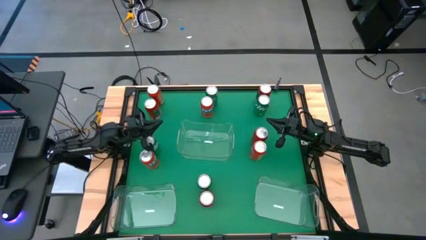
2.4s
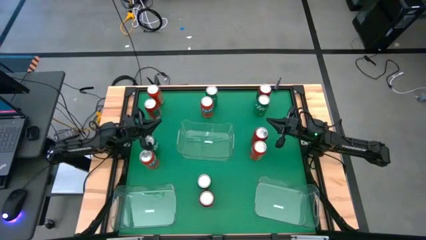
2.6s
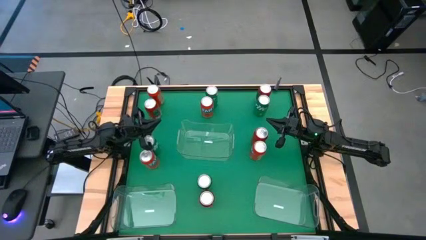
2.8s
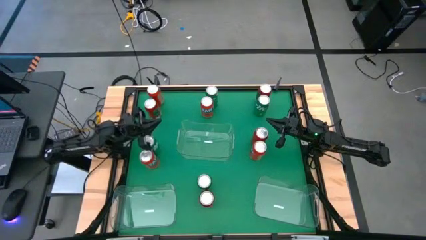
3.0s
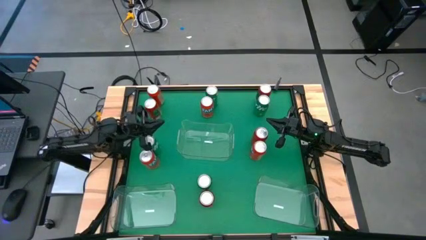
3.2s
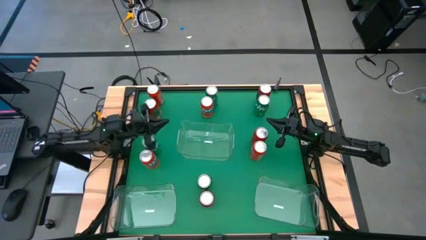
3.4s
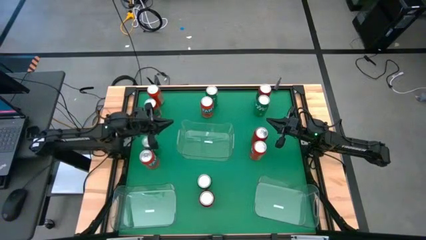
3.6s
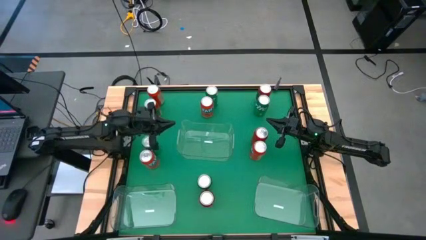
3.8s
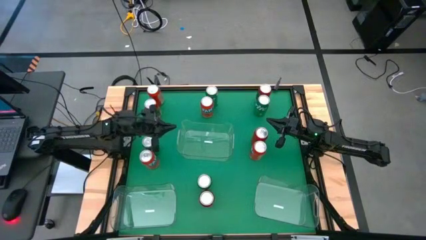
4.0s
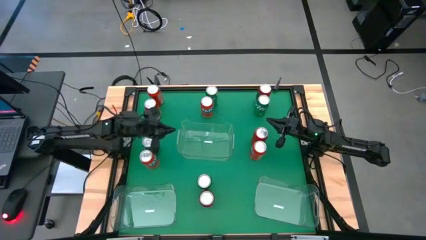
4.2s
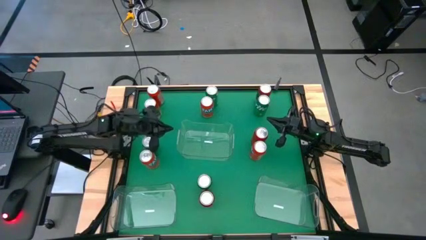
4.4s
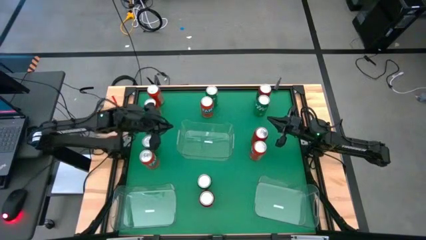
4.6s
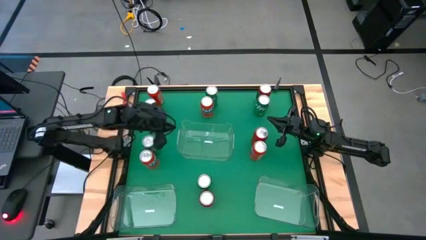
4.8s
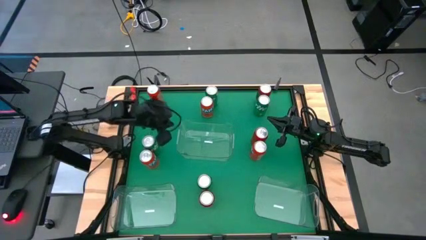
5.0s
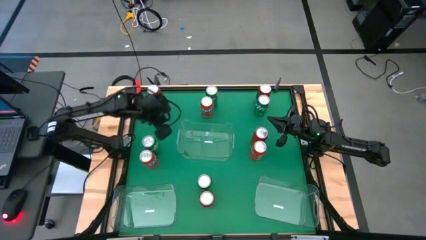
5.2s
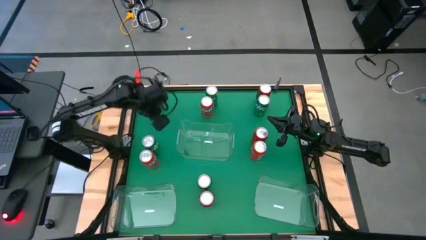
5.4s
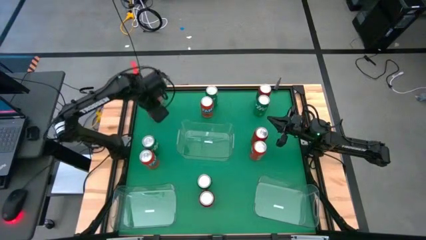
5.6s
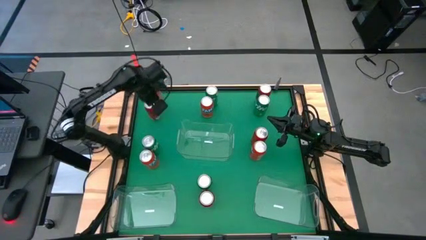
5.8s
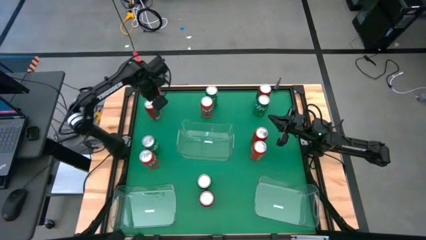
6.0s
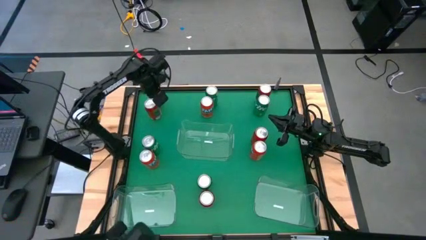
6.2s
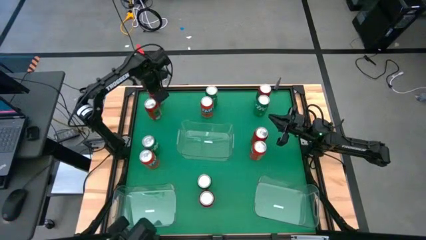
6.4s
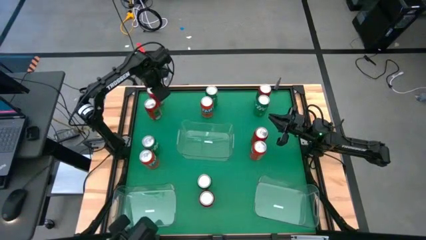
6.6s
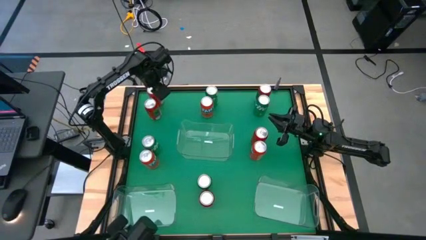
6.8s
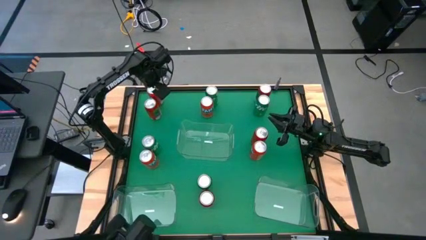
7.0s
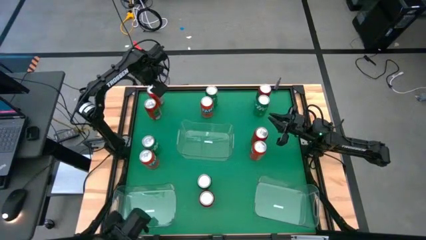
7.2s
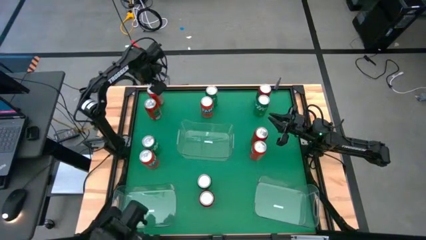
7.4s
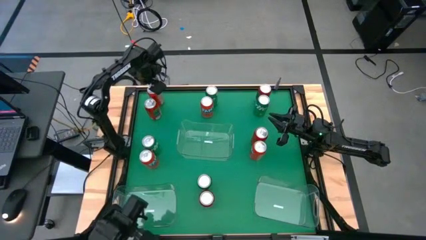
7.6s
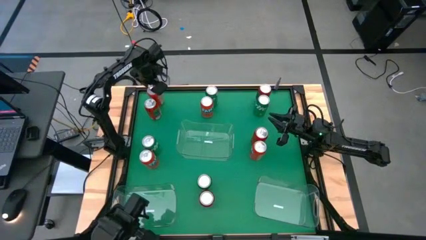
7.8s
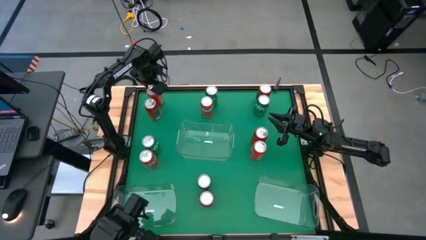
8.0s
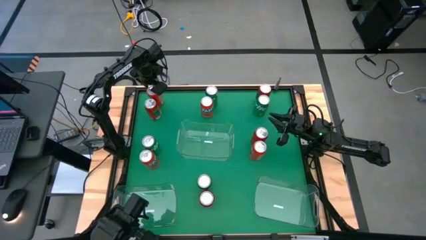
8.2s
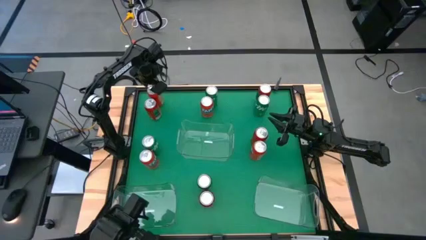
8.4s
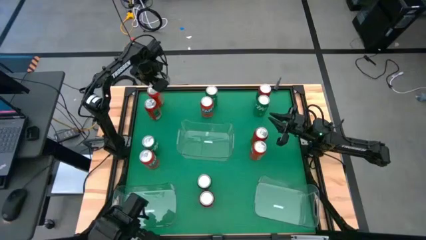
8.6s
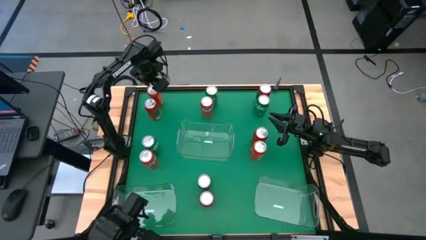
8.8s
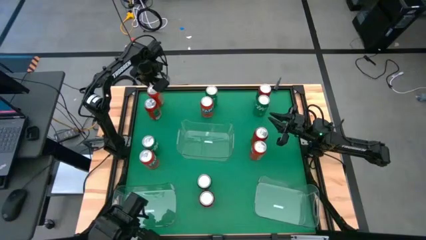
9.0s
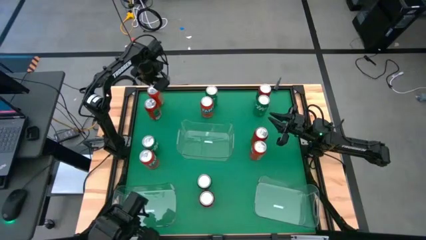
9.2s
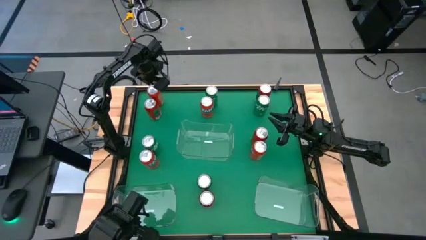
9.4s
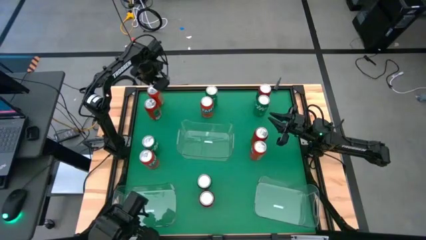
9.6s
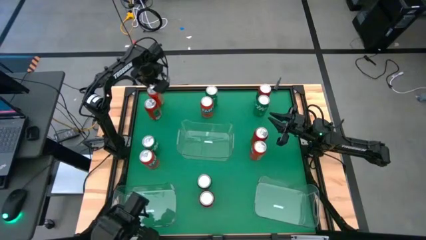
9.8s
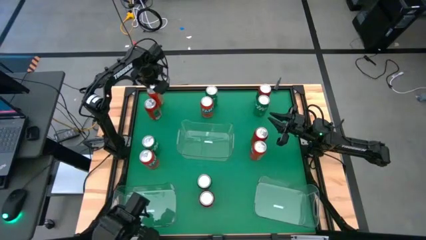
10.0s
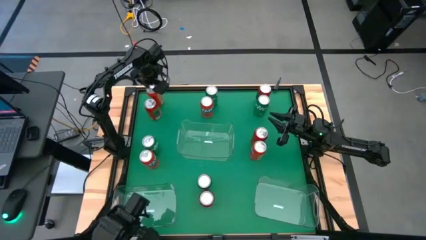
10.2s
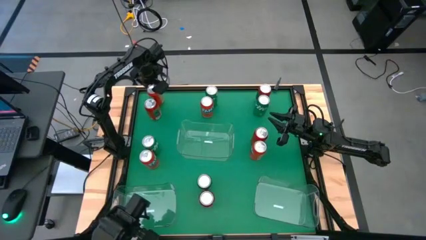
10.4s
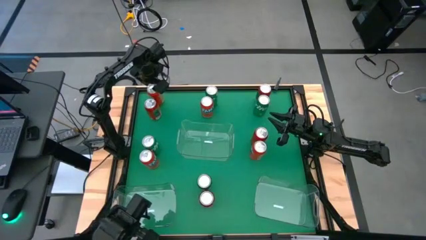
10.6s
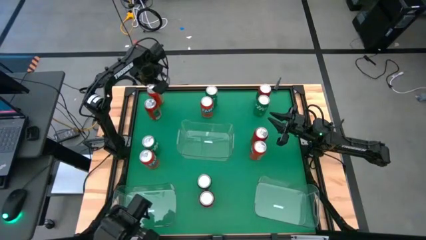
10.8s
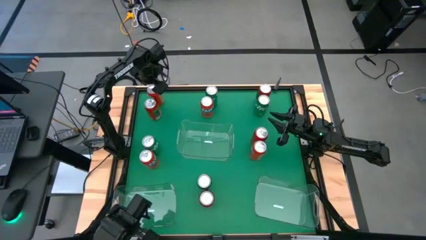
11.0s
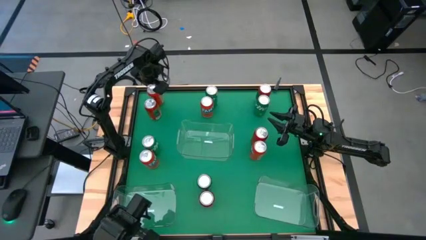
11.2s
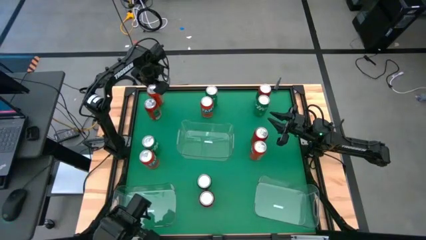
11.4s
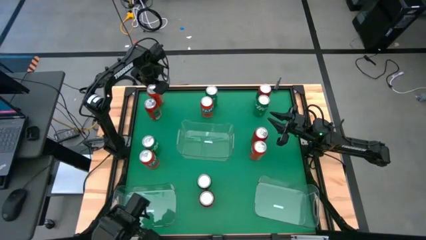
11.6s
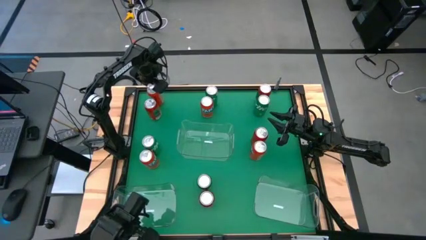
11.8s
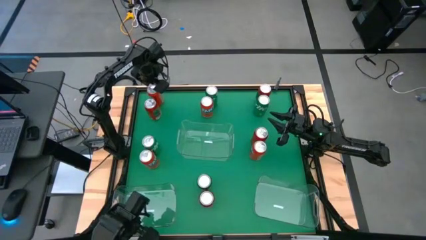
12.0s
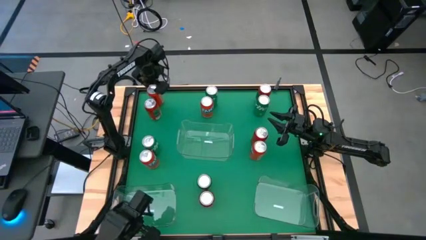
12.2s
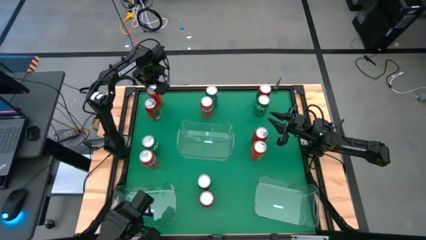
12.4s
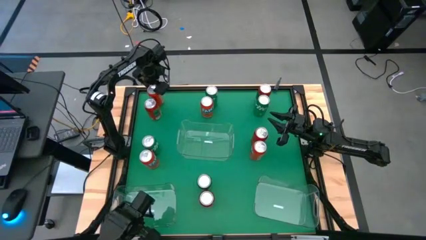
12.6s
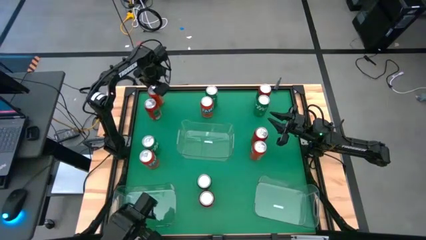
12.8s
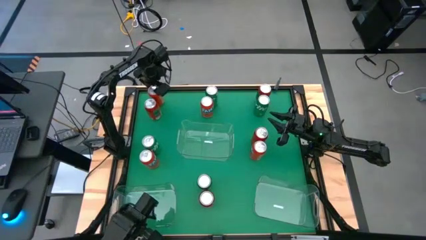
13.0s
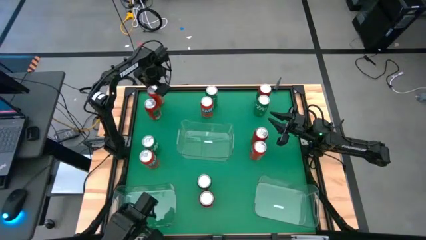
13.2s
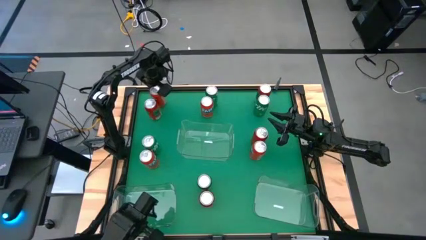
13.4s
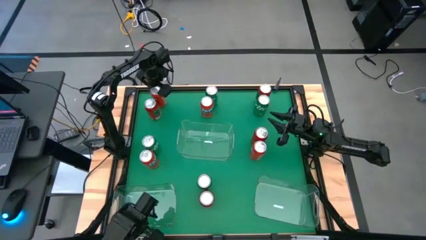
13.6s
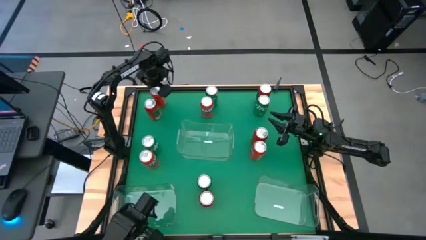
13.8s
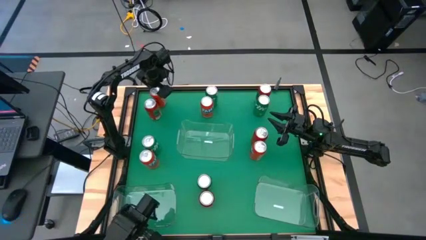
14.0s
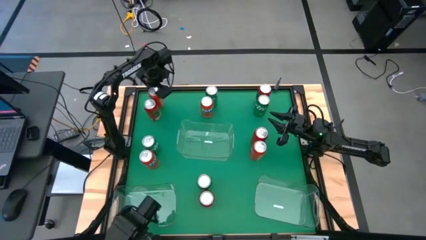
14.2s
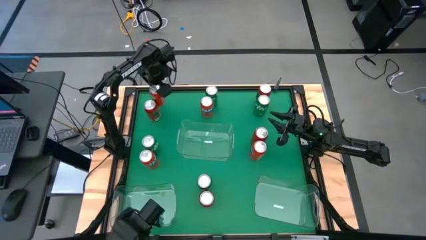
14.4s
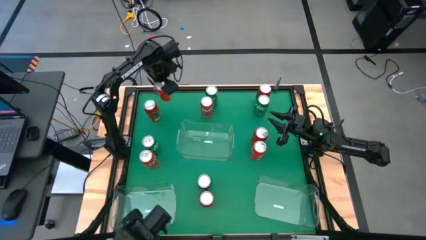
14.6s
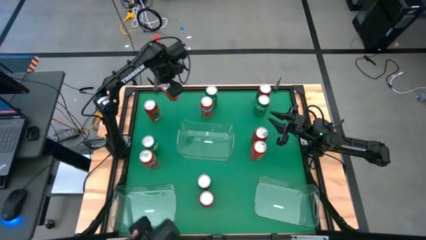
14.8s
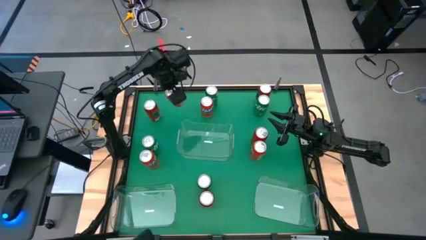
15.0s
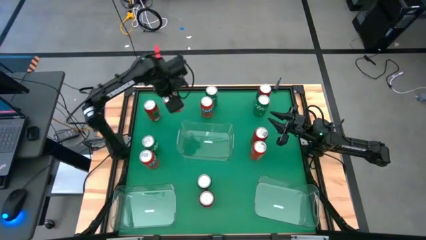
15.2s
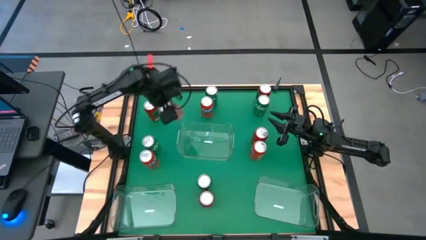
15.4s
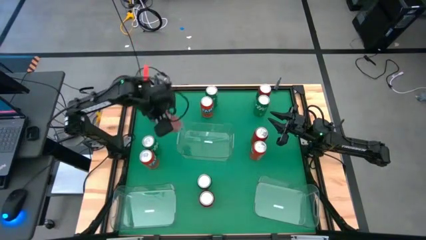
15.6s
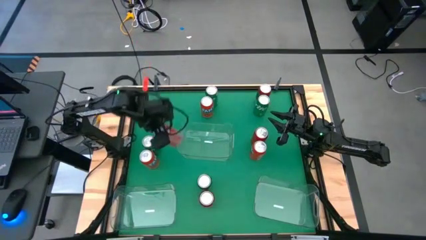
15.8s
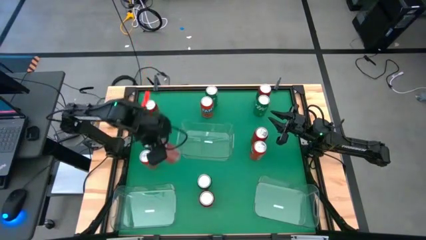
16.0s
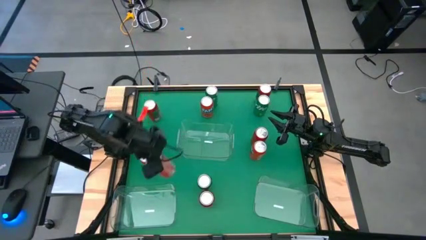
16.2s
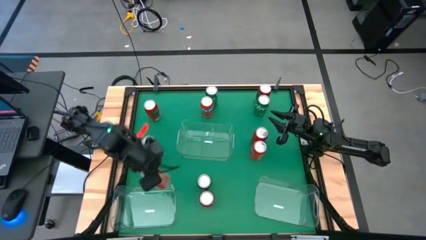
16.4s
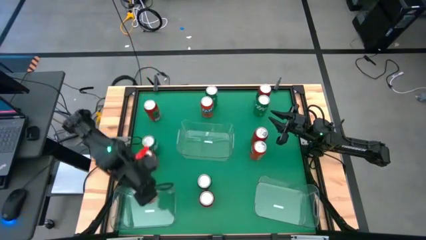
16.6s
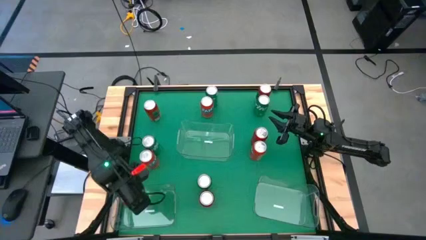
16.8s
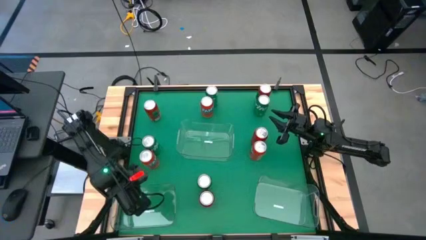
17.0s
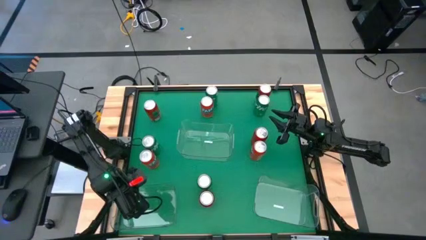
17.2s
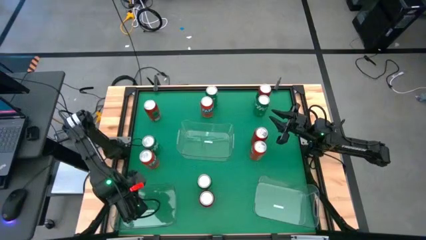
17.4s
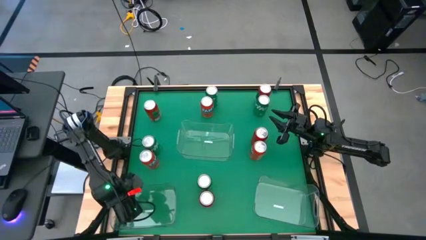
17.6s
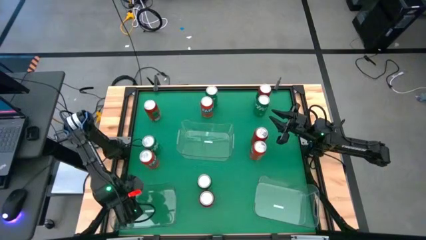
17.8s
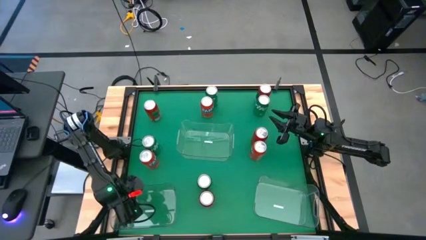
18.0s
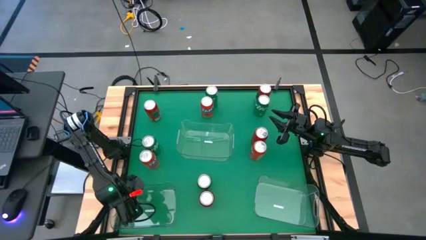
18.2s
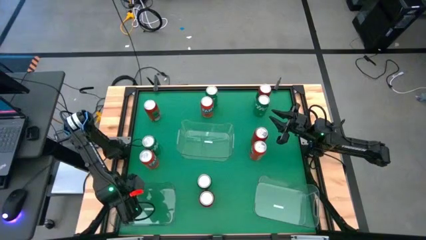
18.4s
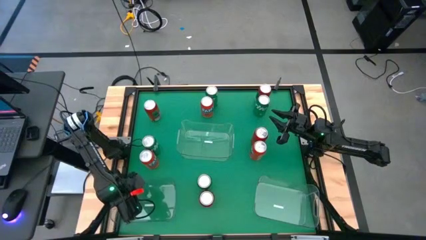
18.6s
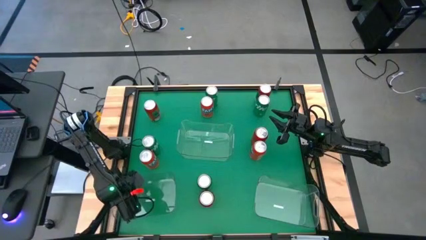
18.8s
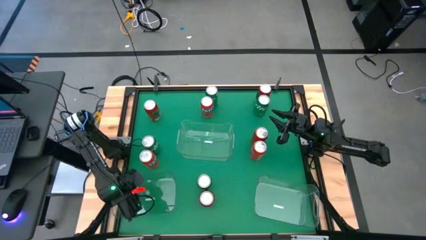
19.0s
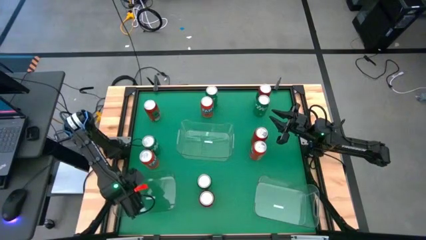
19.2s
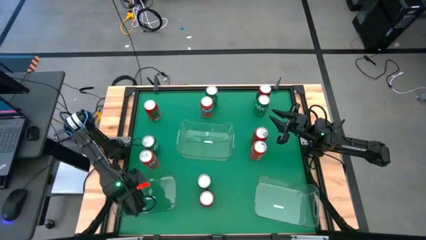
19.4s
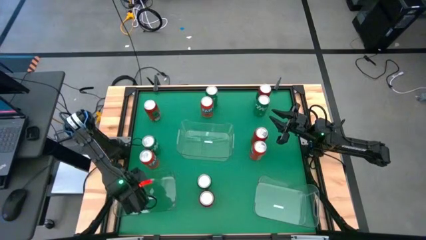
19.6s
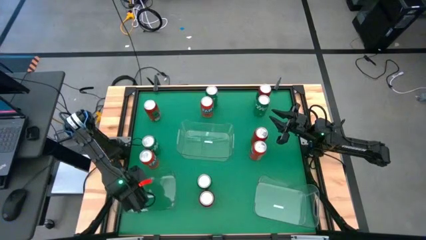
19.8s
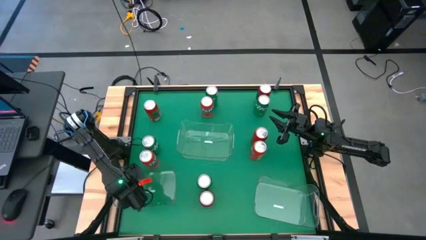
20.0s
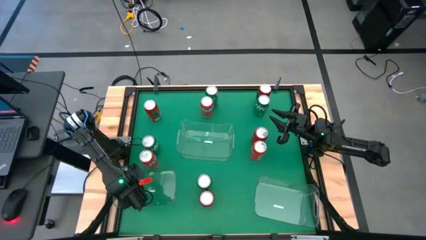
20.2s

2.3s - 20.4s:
Task: Sort soda cans
Put the red soda can into the bottom left transparent bin
